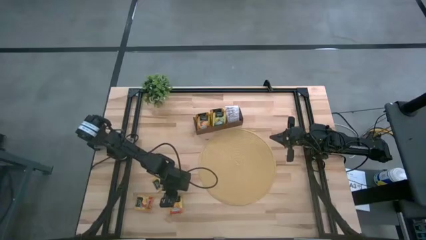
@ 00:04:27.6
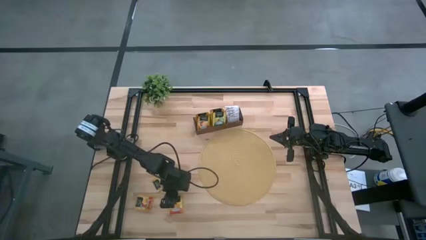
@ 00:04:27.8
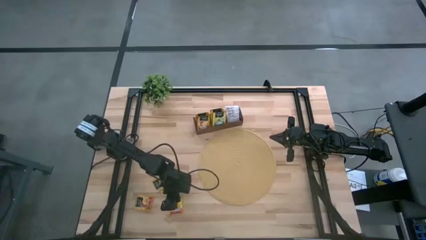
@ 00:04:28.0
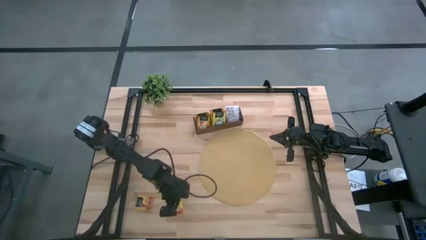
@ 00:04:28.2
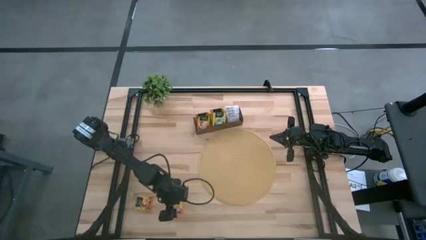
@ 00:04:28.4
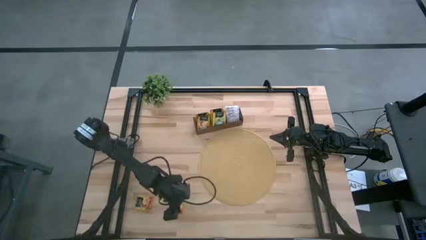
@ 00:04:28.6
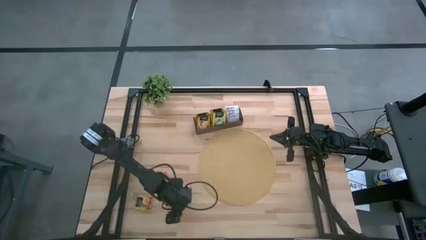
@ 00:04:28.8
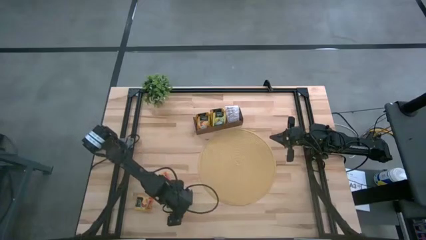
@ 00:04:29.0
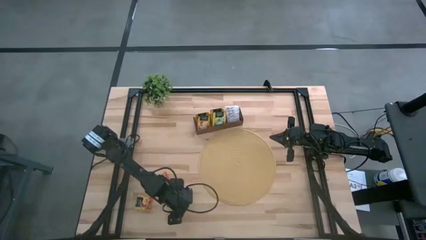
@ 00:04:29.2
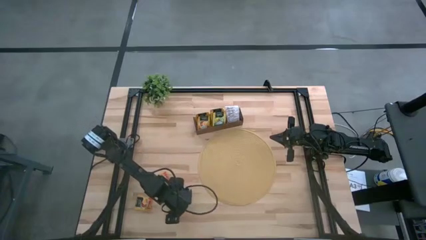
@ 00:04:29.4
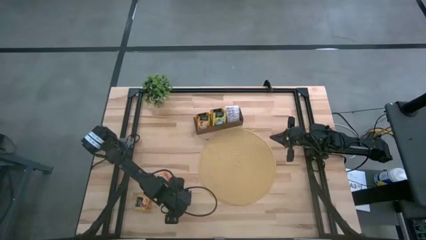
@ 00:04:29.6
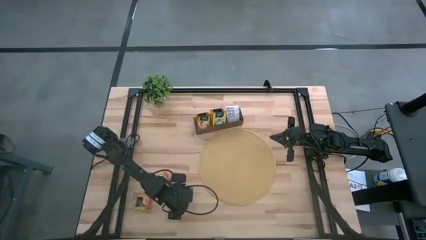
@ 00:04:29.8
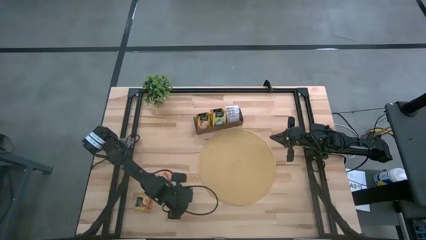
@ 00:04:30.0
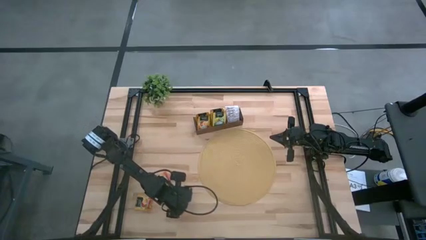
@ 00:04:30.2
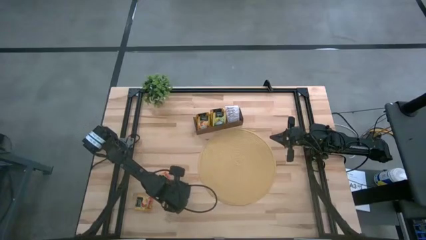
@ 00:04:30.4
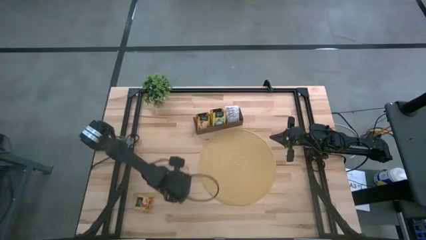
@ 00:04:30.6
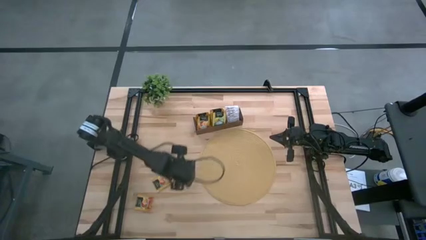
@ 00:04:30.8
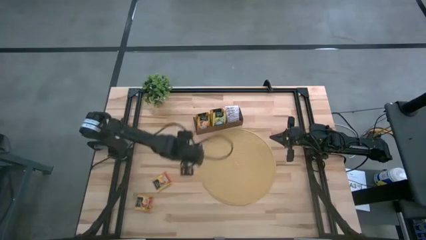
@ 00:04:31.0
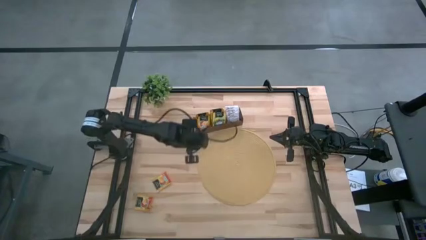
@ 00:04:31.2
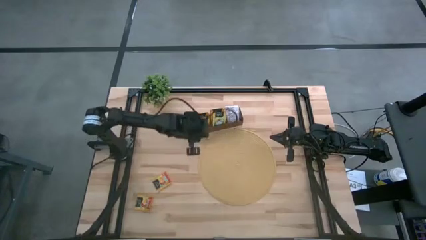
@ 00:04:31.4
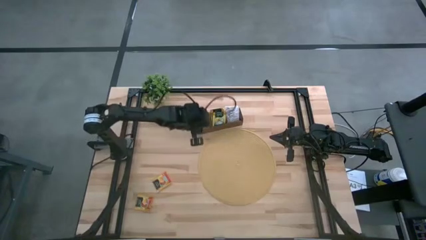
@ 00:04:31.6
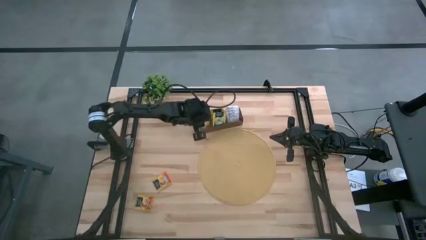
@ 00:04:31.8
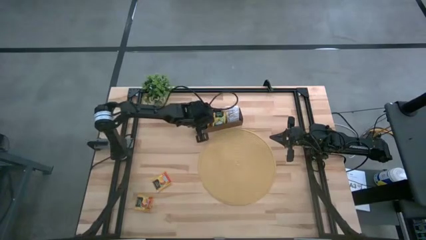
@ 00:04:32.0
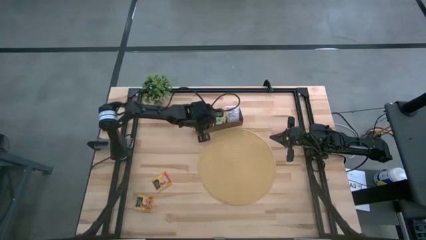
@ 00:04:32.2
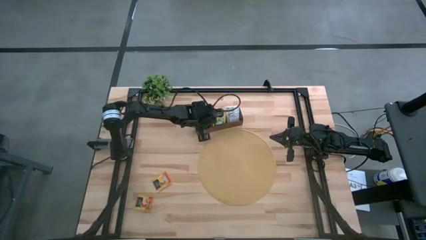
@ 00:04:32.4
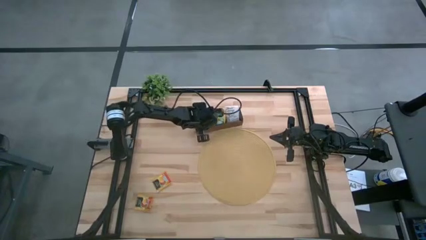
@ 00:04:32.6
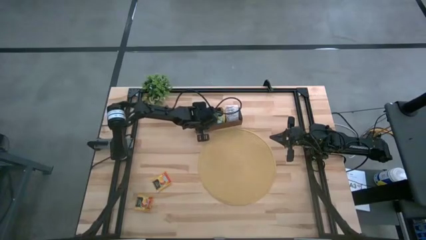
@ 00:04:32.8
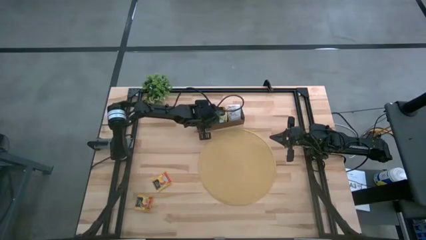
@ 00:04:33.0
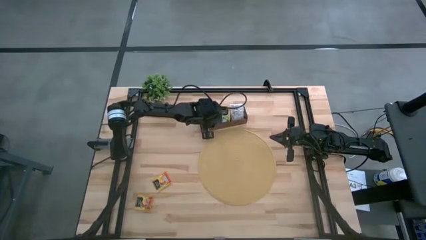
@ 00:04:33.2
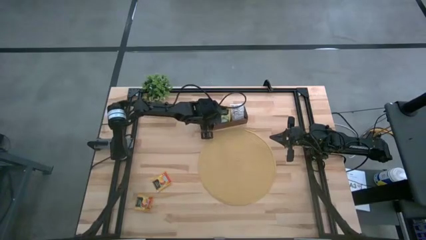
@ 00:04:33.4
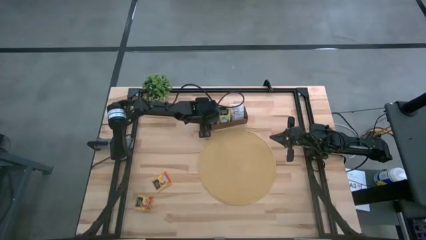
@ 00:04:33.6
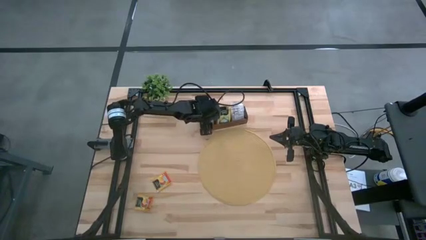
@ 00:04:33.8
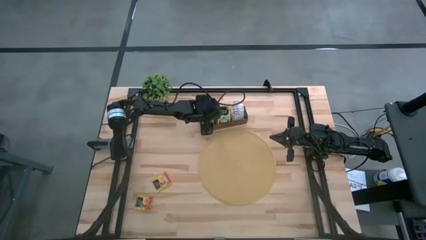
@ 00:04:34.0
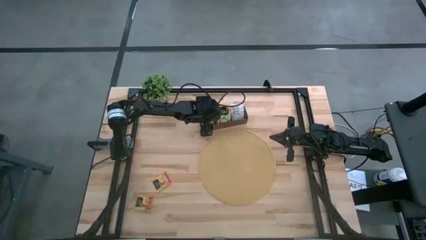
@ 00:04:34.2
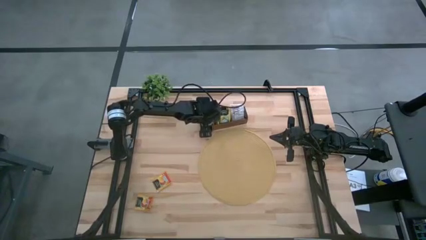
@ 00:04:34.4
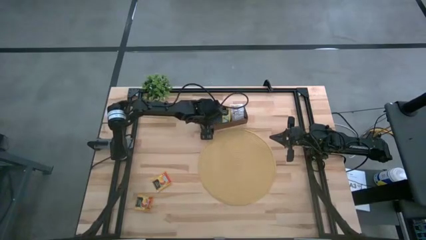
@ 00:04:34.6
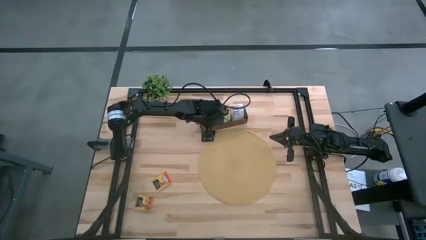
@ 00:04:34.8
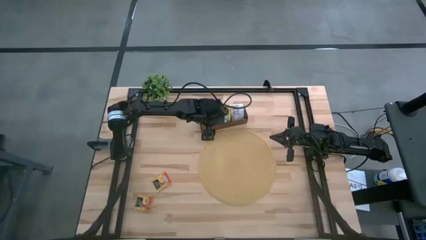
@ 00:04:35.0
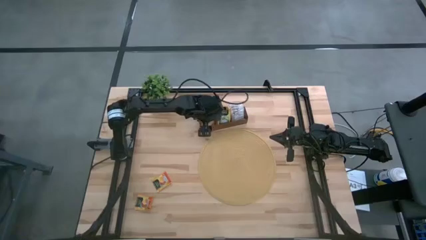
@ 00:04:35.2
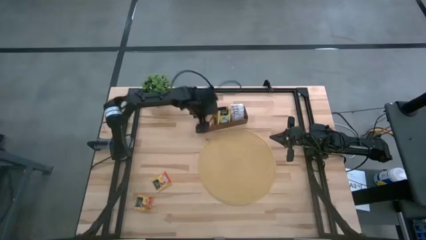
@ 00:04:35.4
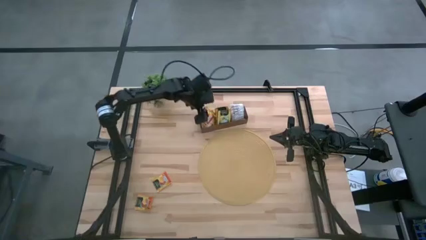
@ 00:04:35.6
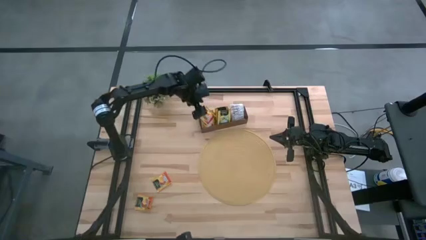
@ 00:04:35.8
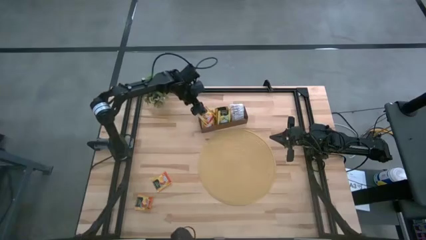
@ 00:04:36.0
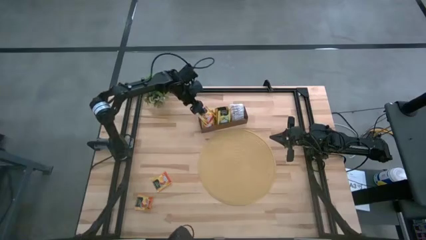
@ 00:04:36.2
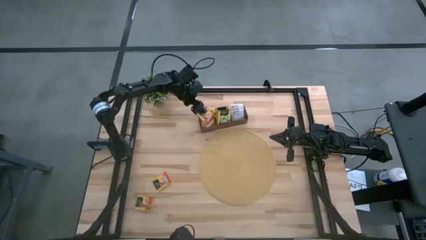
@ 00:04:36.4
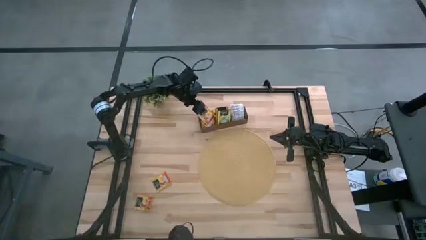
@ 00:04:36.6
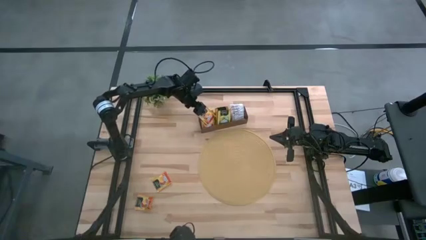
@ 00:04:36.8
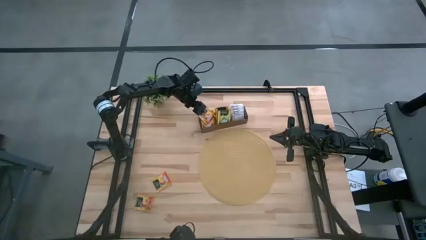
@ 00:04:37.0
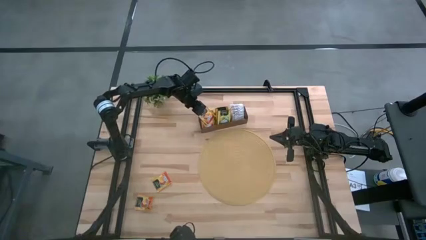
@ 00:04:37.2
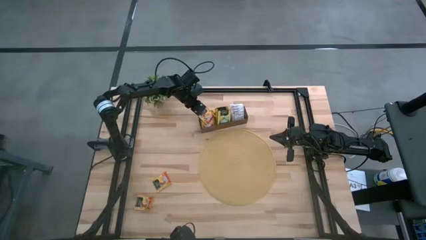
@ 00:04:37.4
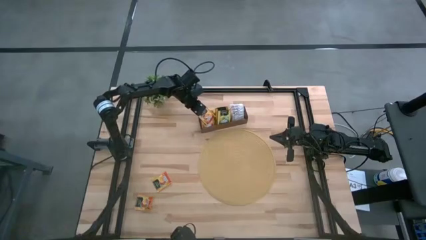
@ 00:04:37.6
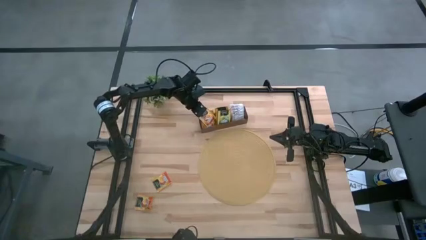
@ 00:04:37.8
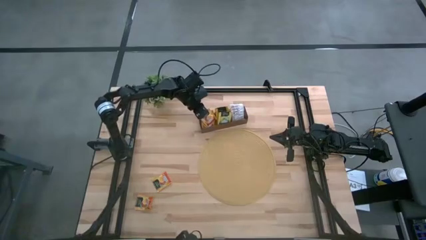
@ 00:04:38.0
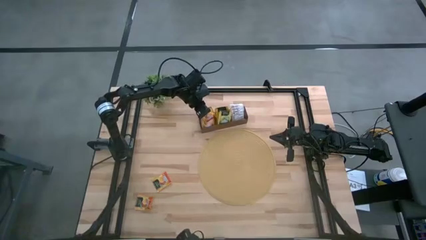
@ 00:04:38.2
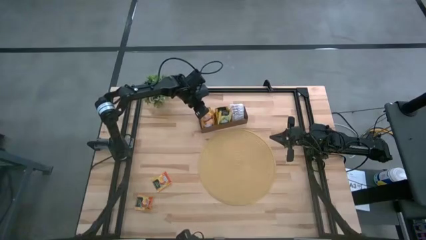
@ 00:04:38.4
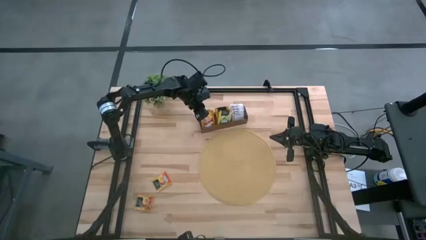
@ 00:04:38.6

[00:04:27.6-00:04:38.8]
Task: Pick & Place Tea
Put the orange tea bag into the left section of the wooden organizer

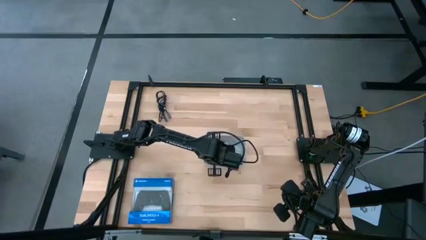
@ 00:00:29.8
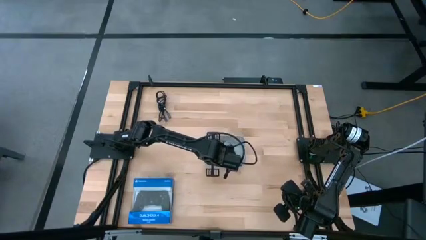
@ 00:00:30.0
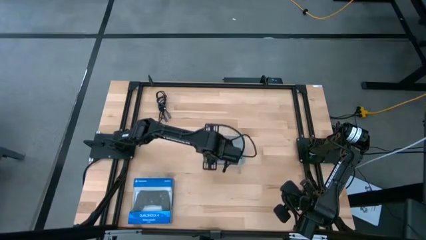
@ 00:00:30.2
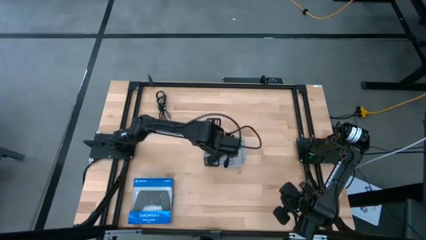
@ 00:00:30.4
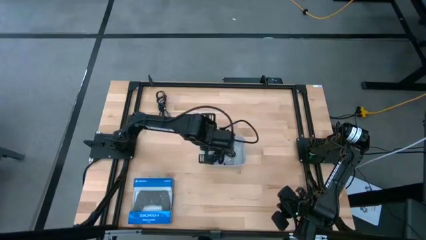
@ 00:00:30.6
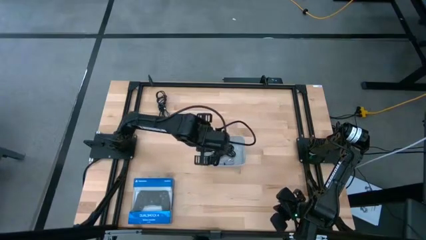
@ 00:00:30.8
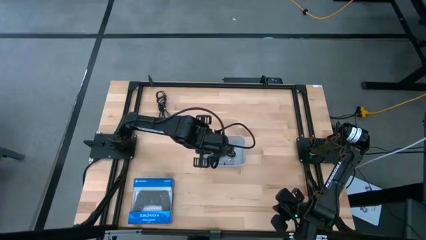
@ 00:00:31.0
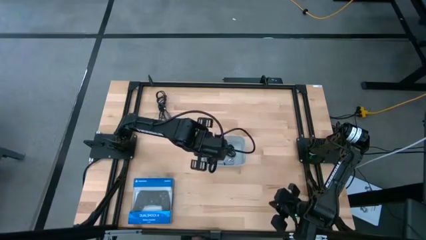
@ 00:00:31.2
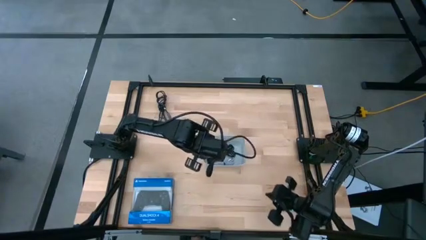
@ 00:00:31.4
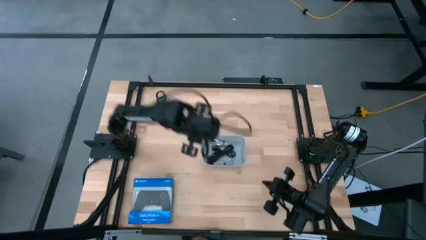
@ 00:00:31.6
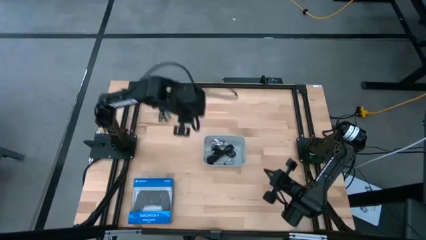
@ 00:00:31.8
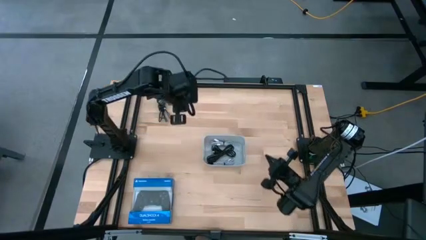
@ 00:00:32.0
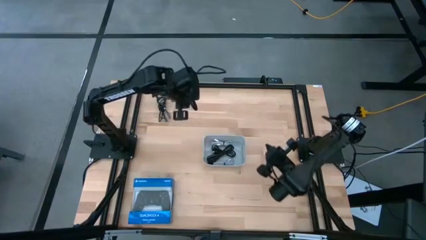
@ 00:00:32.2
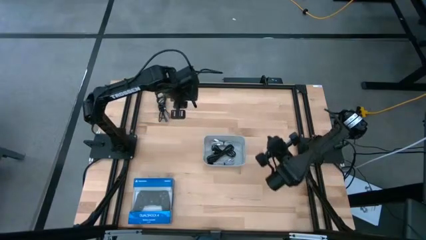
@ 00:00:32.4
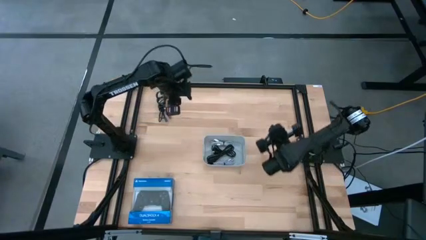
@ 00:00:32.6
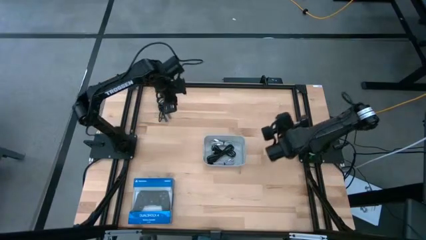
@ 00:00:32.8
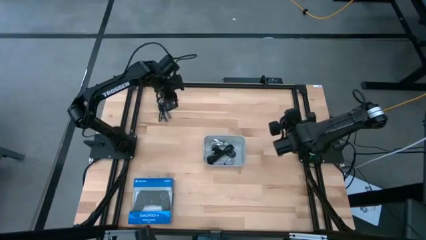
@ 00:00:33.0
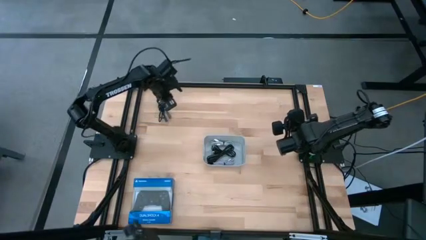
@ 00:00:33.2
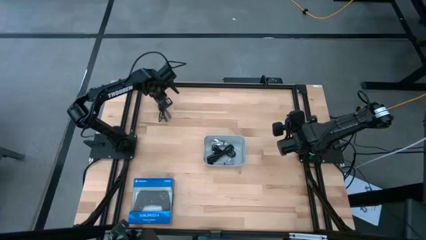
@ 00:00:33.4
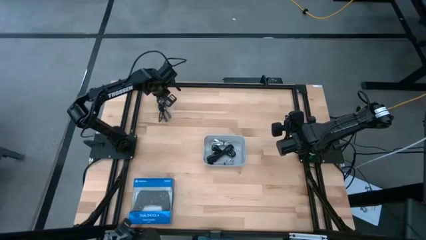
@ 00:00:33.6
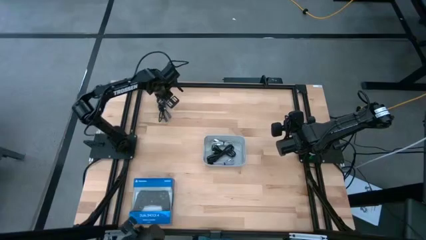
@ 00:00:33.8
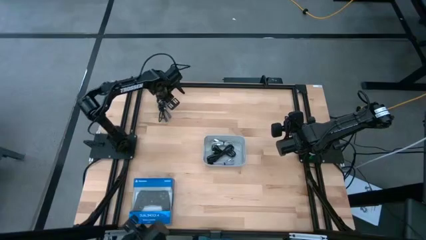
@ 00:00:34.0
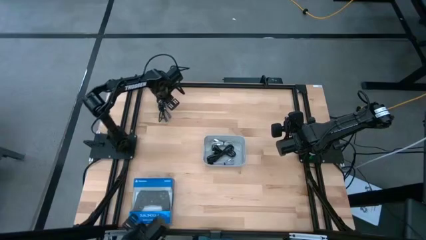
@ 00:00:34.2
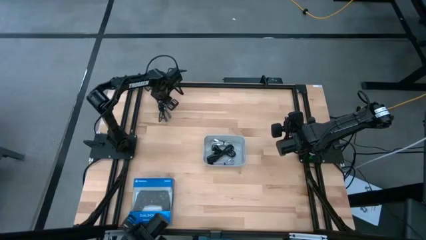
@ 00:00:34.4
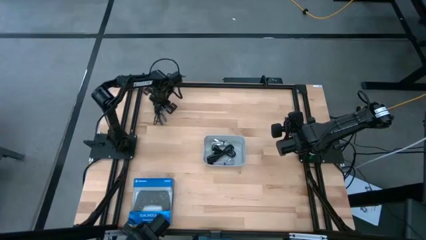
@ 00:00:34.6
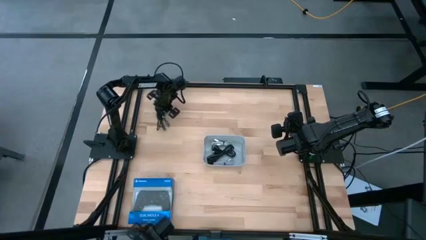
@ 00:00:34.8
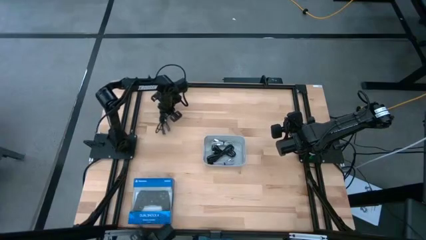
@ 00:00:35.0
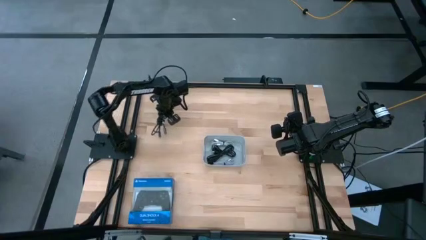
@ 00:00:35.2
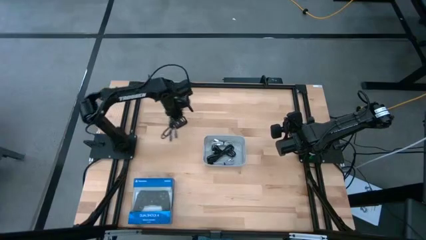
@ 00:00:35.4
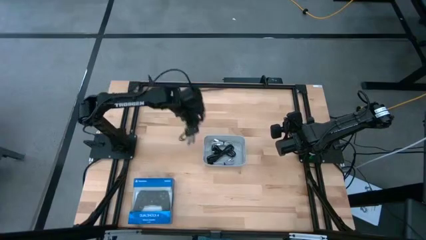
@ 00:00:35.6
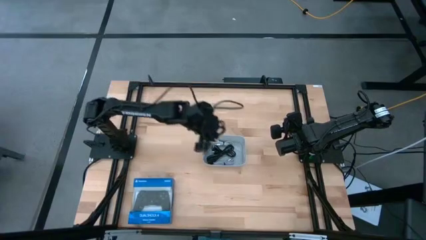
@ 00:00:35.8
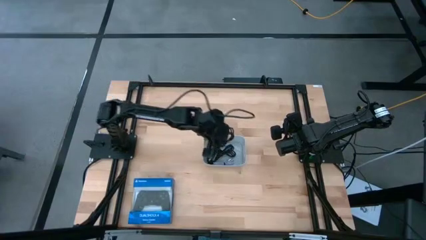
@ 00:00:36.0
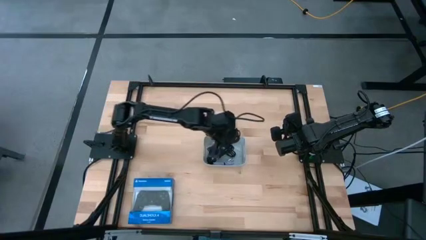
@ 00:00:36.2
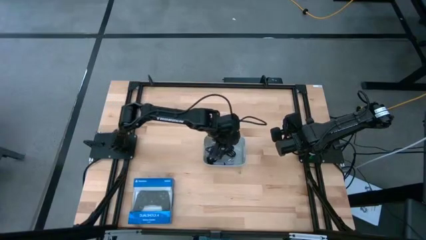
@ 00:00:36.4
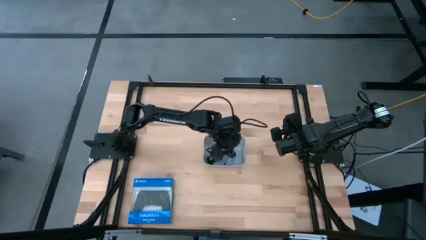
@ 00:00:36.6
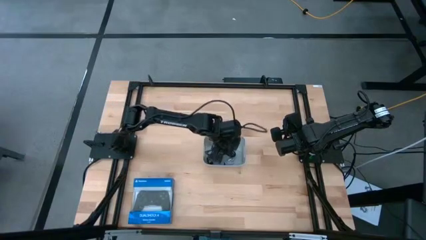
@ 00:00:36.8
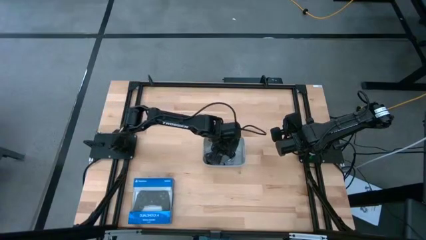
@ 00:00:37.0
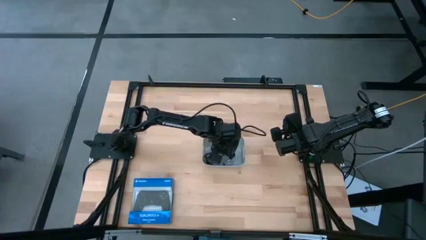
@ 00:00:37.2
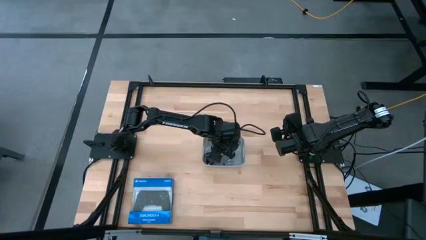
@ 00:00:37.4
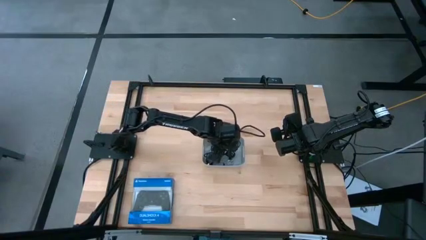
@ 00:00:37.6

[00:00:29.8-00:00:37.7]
Task: Pick and place USB-C Cables
Put the black white charger into the gray bin
